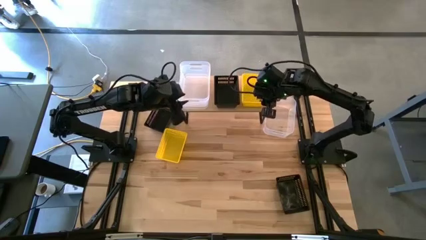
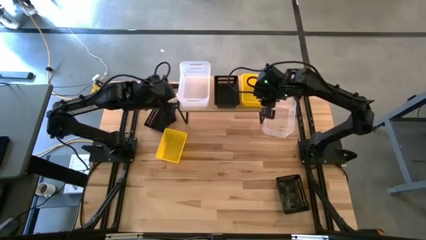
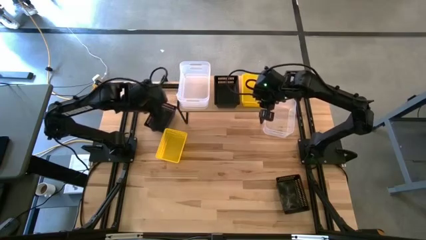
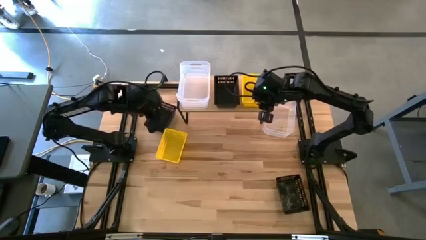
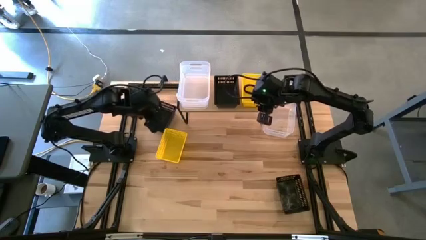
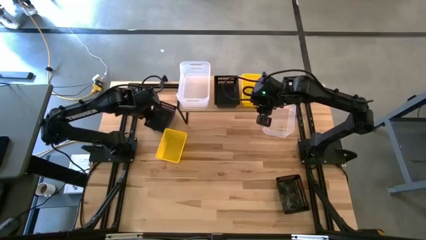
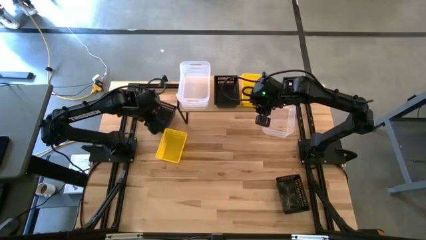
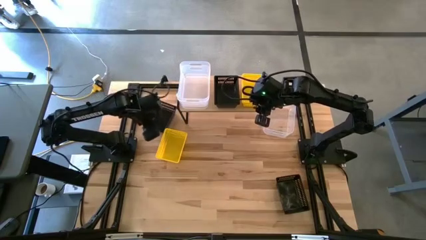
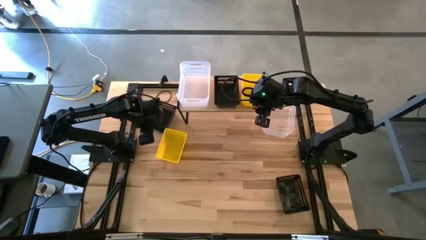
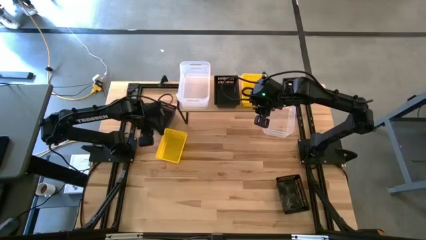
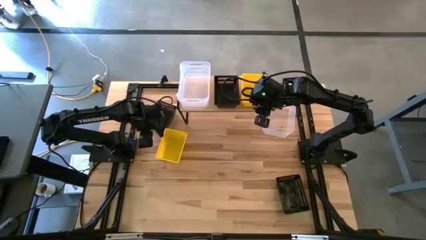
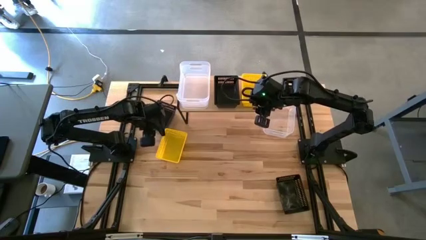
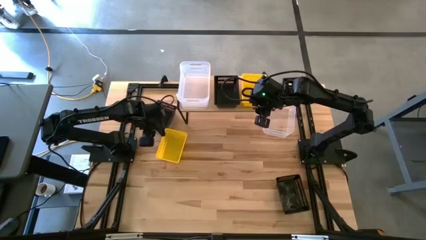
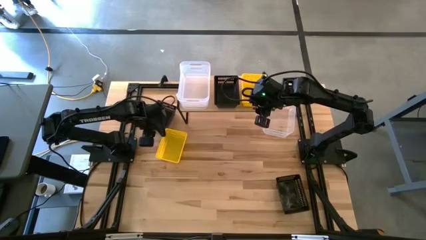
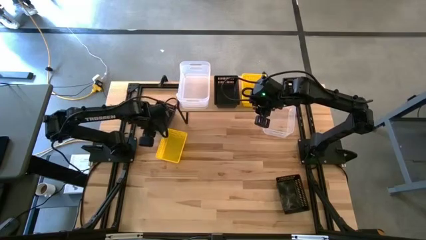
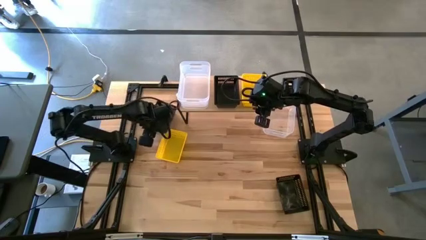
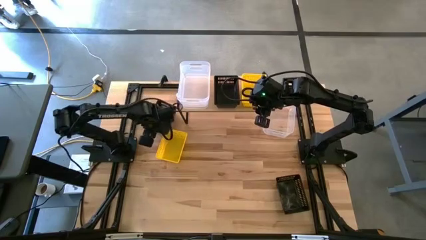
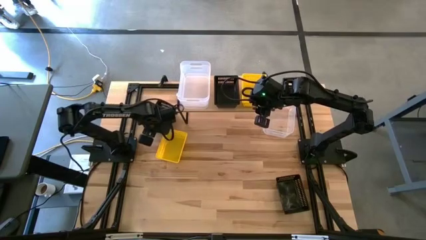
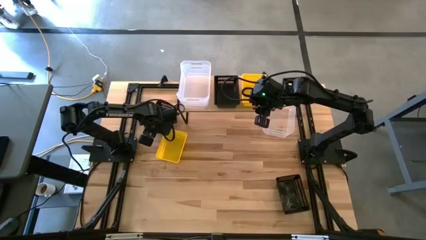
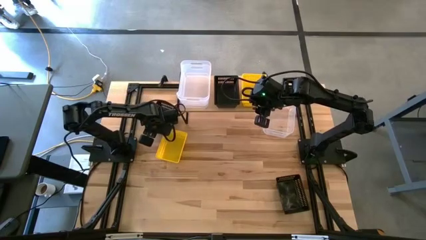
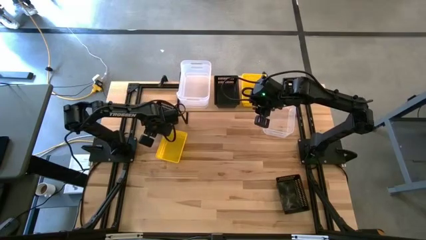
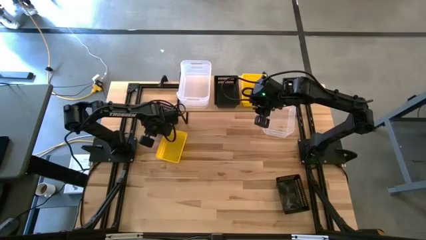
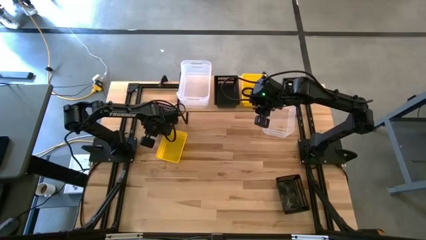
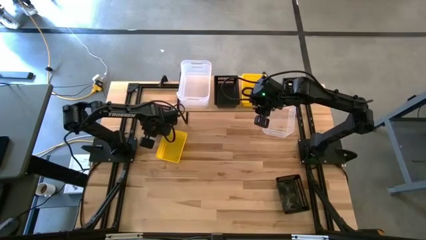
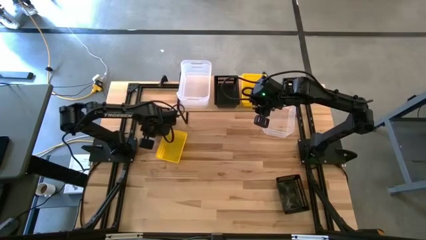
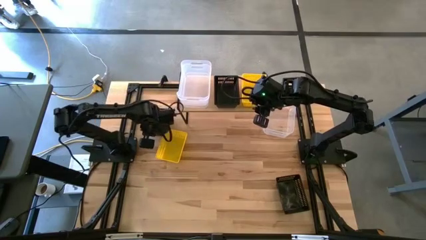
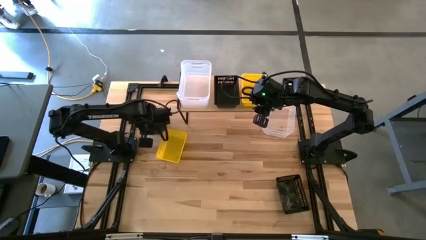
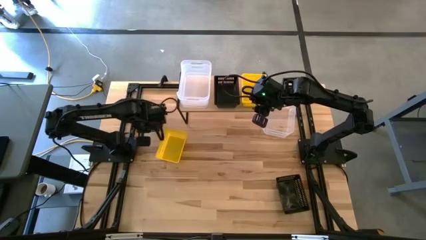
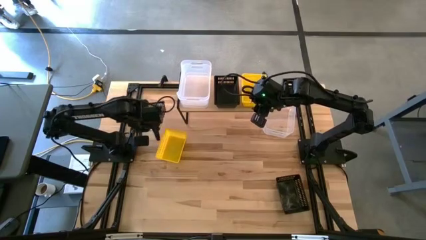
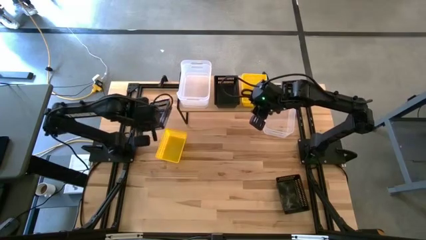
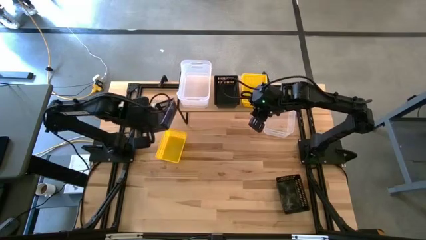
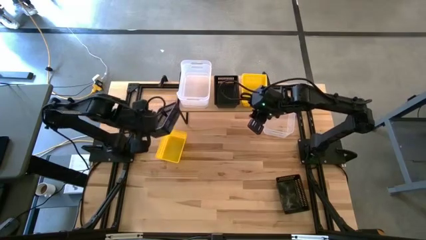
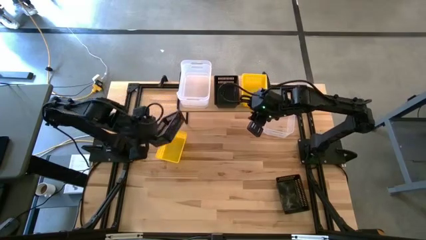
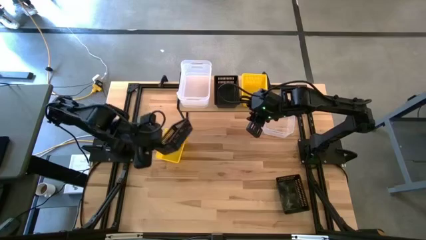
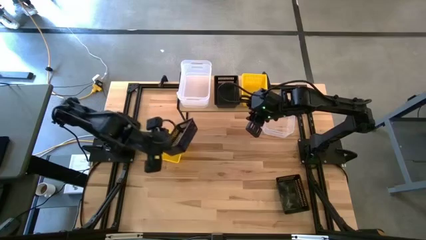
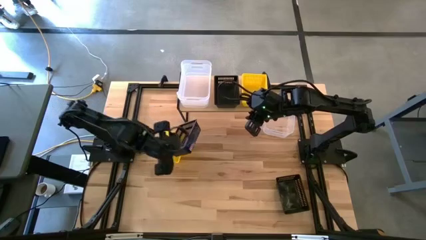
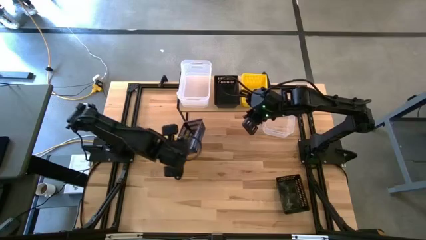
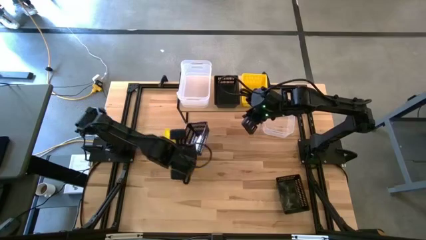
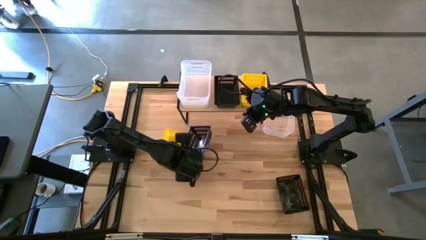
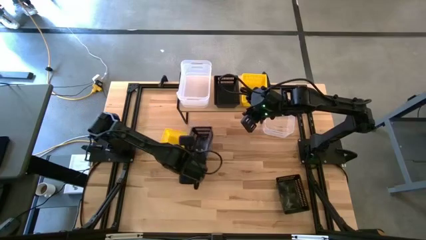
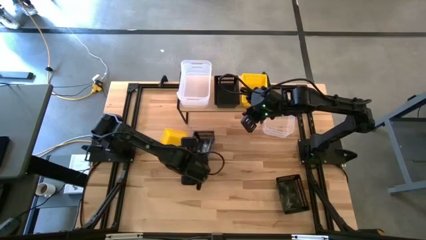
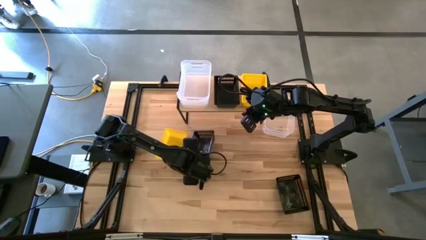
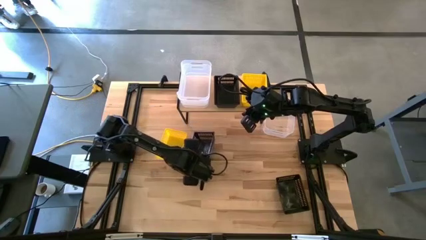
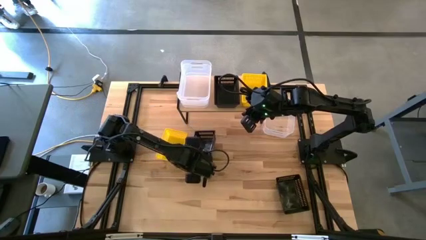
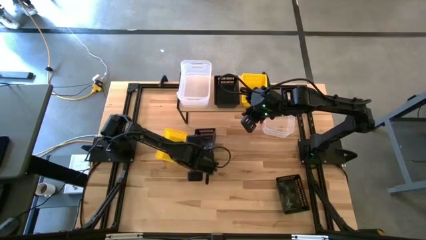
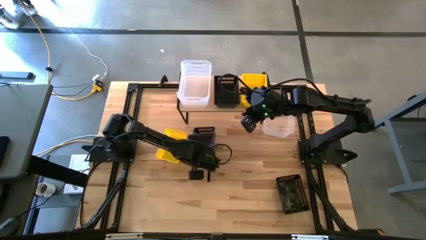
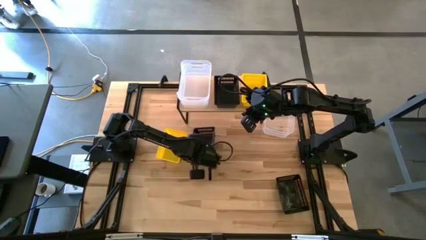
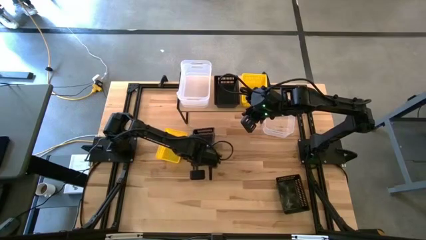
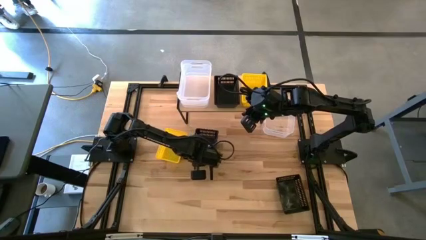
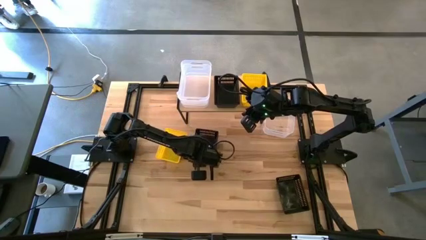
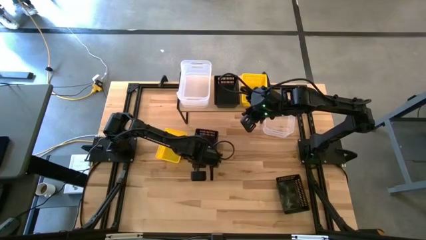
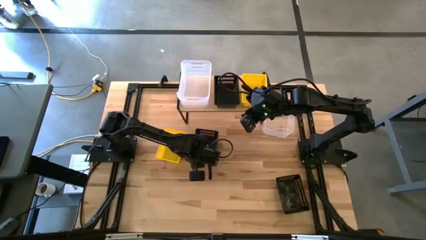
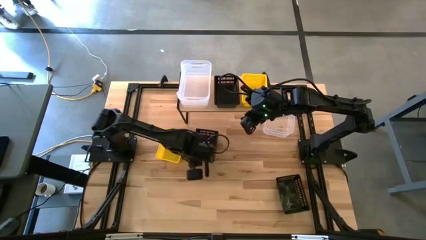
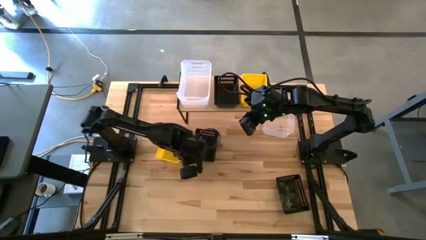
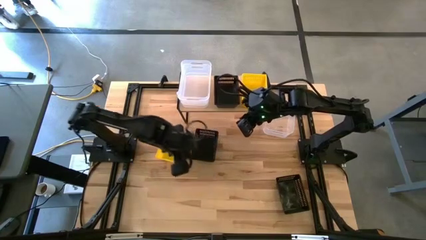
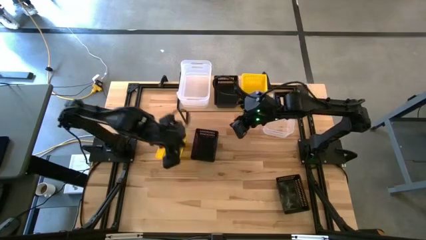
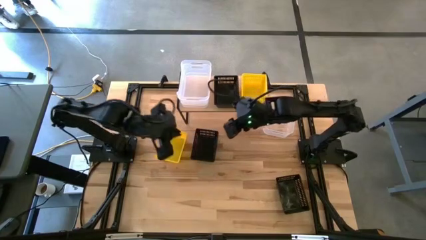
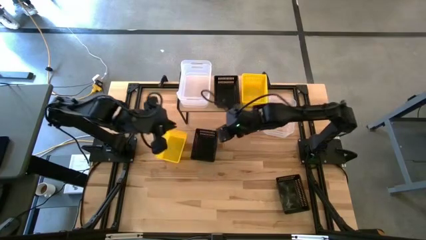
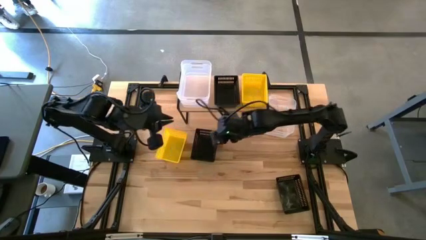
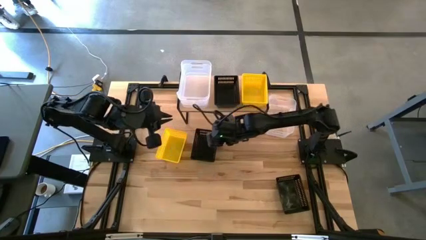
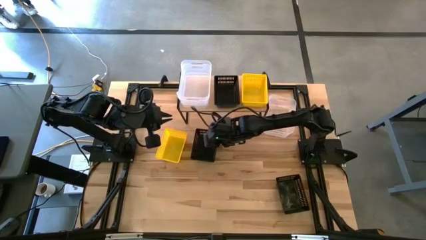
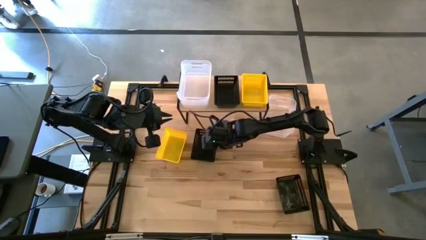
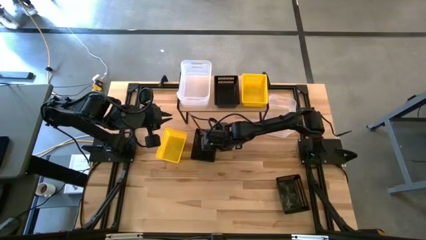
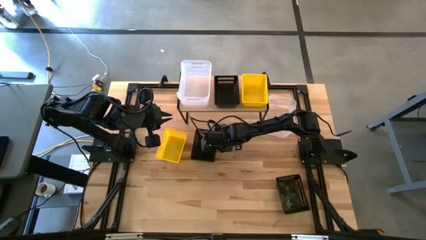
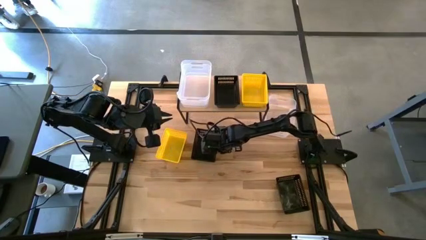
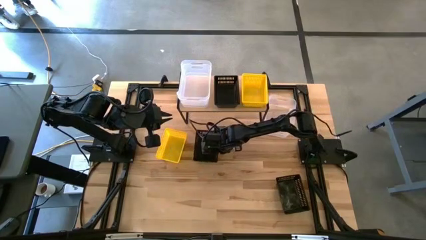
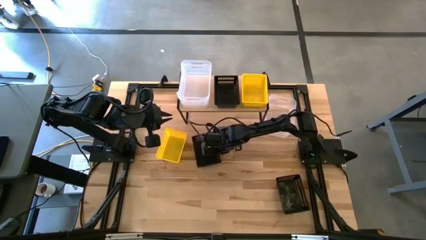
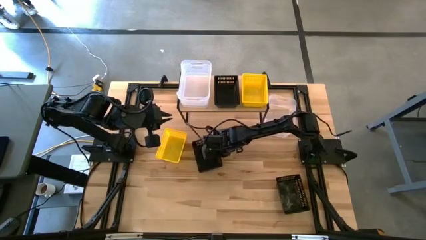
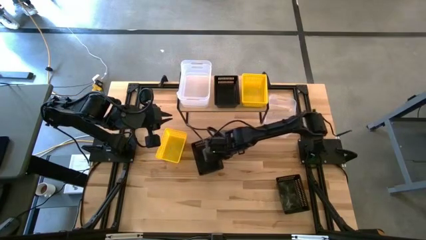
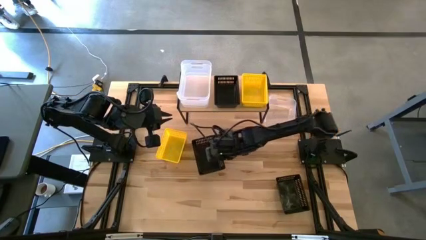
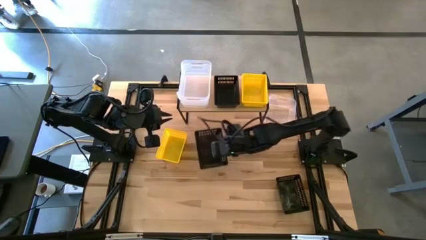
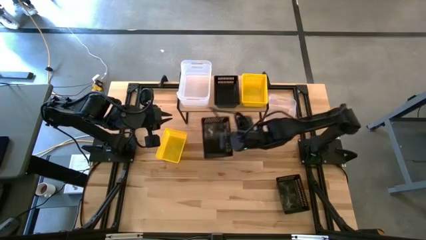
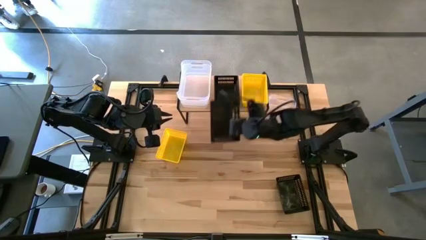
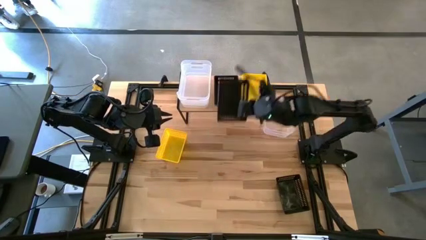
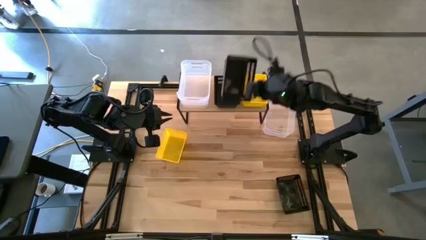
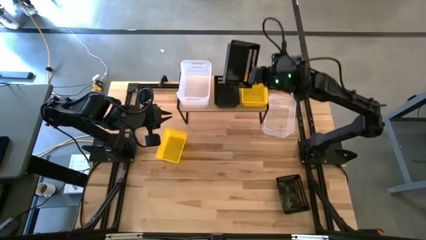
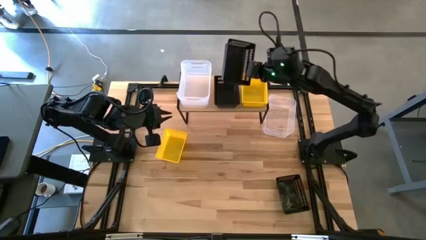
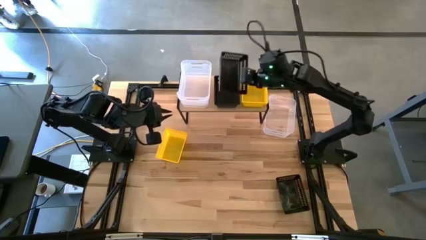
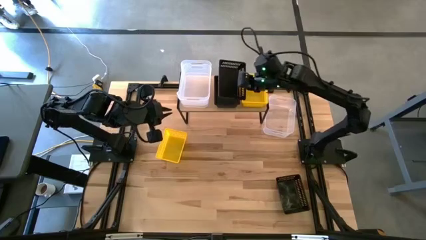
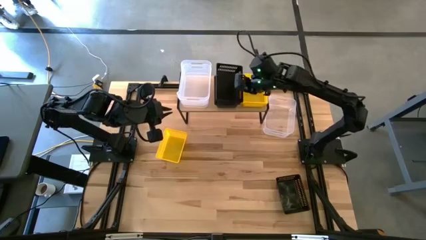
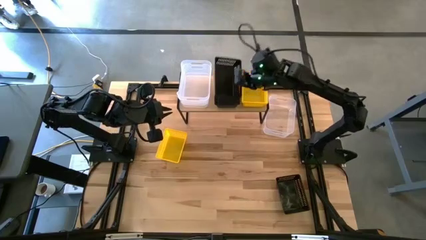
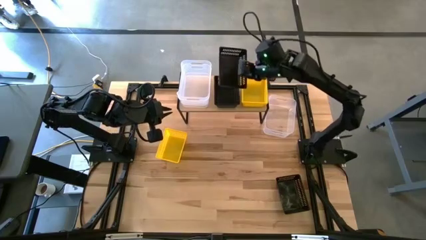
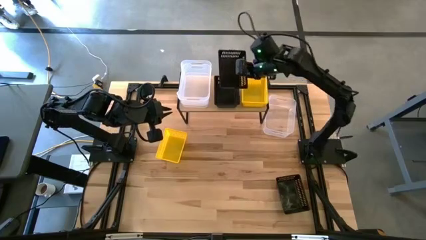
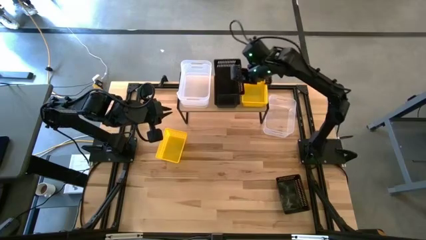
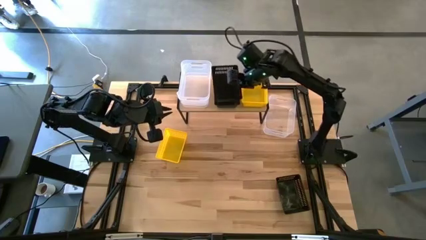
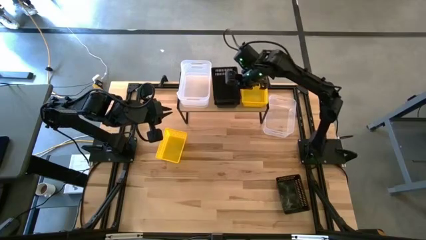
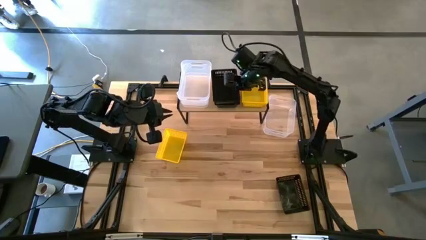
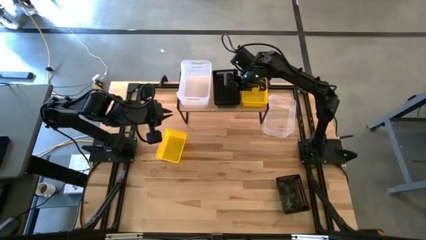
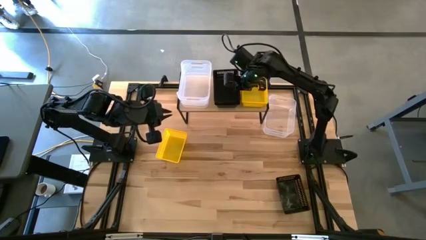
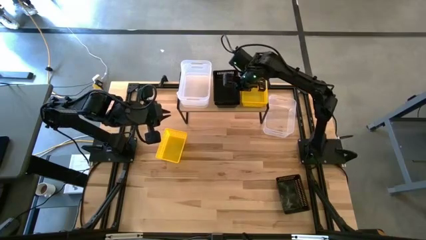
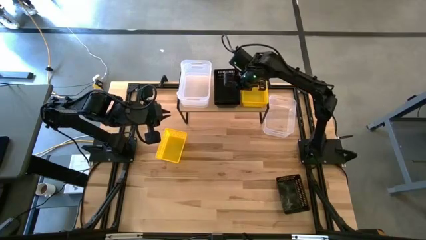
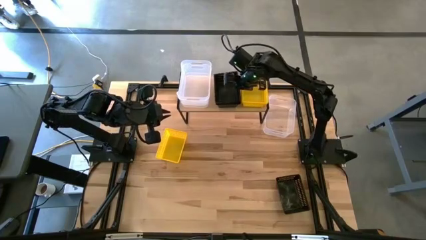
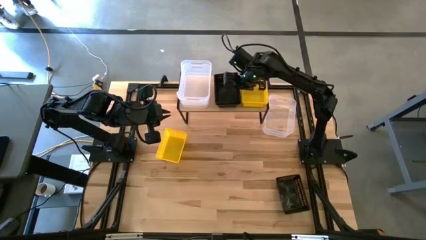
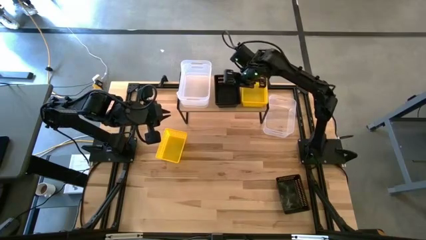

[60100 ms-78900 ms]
Task: Stack baskets on shelf by color
Stack the top black bin on top of the black bin
